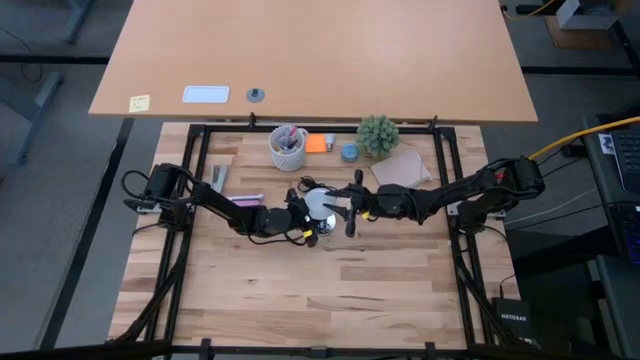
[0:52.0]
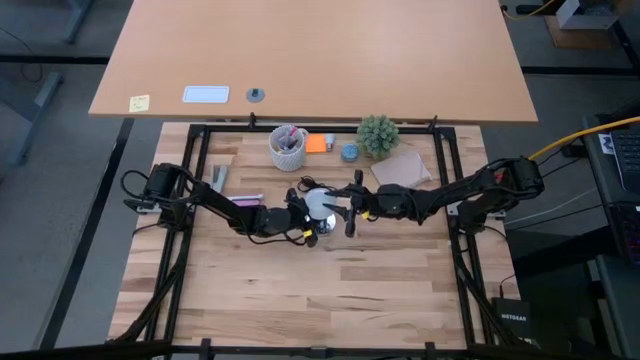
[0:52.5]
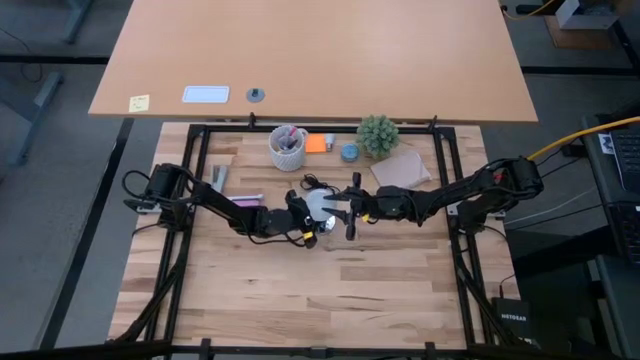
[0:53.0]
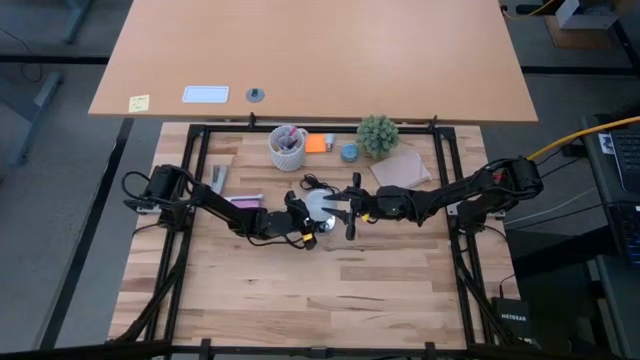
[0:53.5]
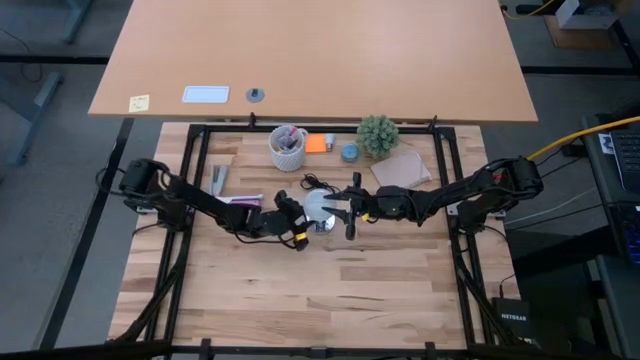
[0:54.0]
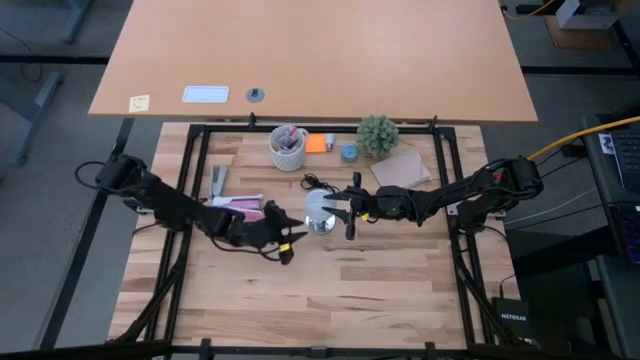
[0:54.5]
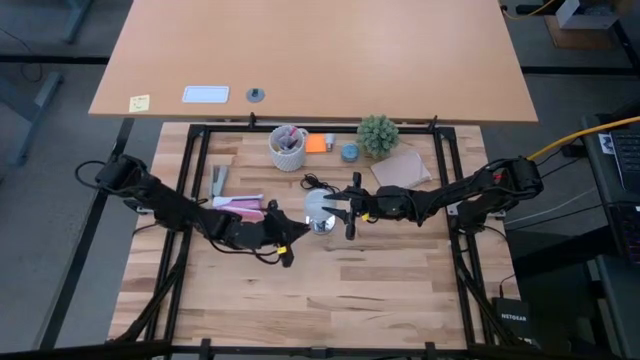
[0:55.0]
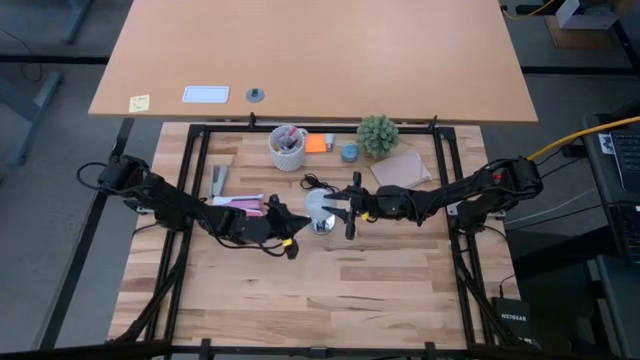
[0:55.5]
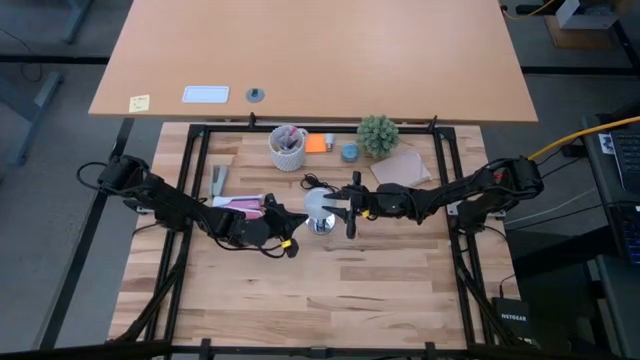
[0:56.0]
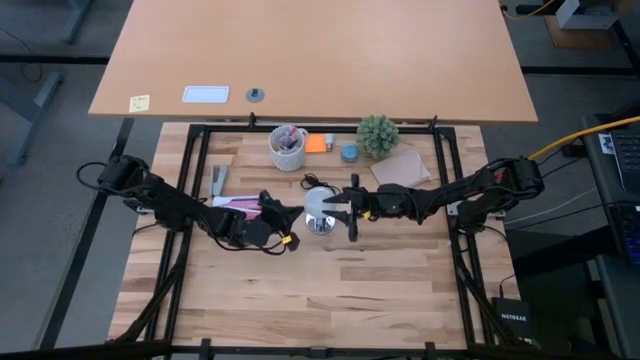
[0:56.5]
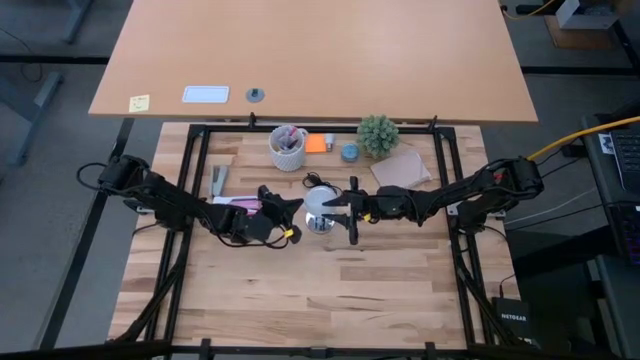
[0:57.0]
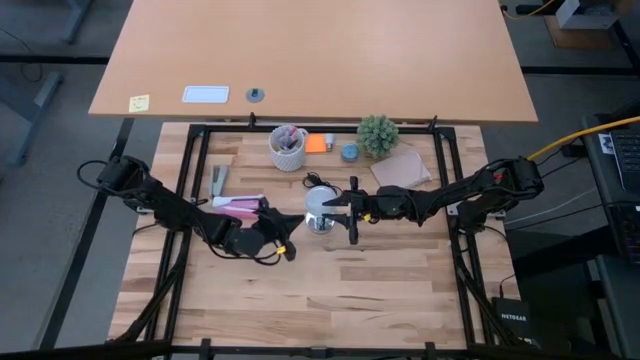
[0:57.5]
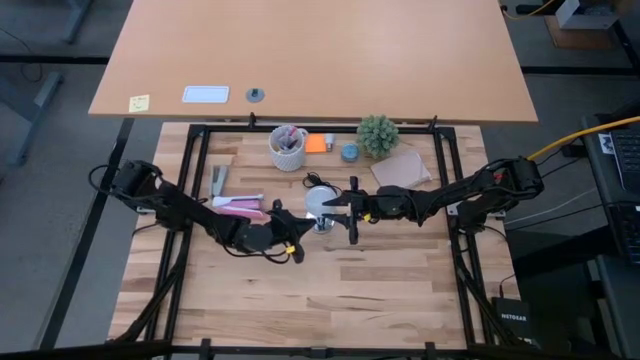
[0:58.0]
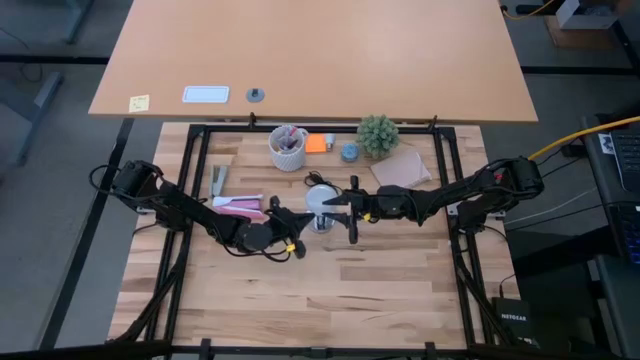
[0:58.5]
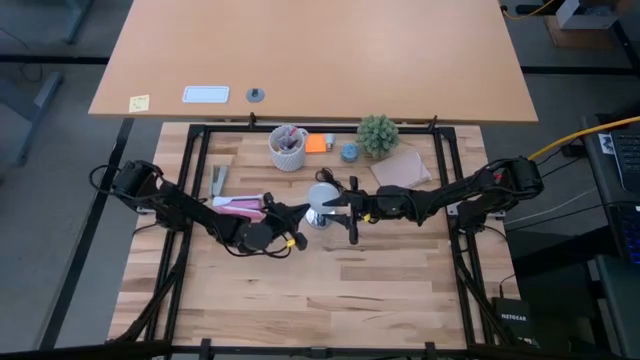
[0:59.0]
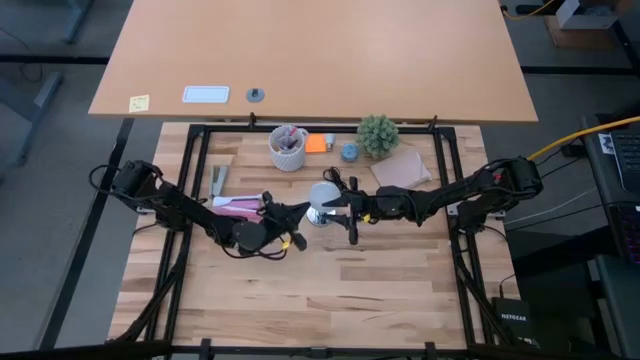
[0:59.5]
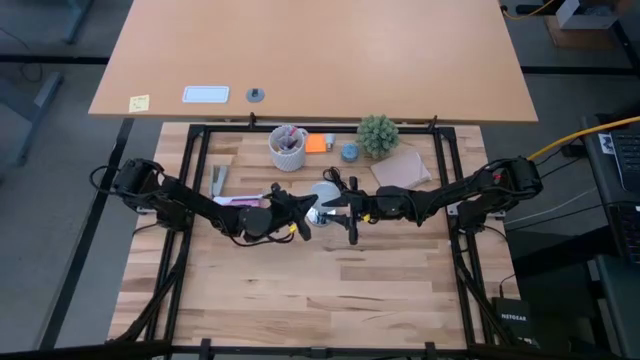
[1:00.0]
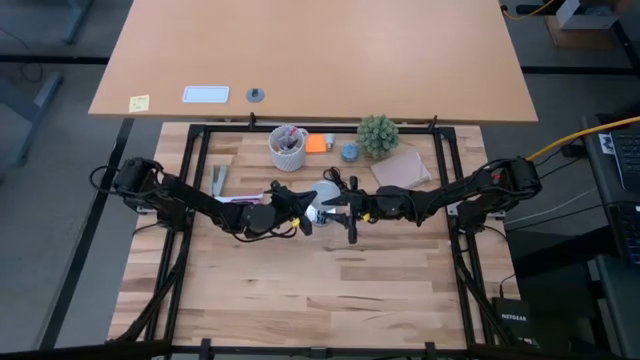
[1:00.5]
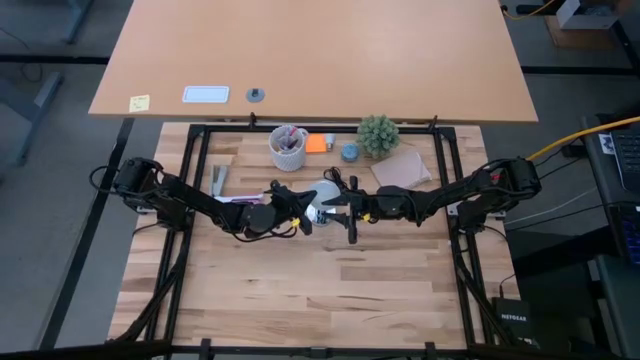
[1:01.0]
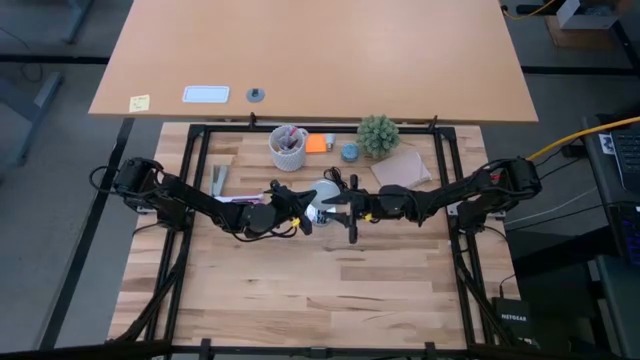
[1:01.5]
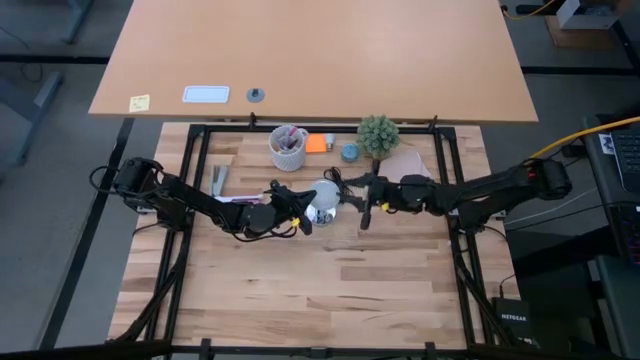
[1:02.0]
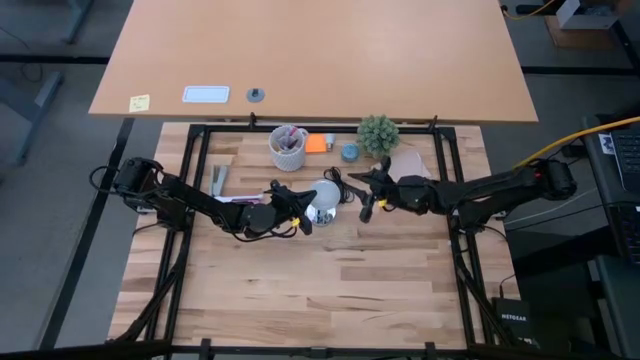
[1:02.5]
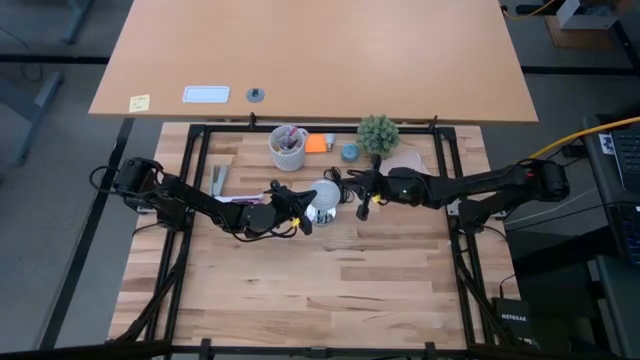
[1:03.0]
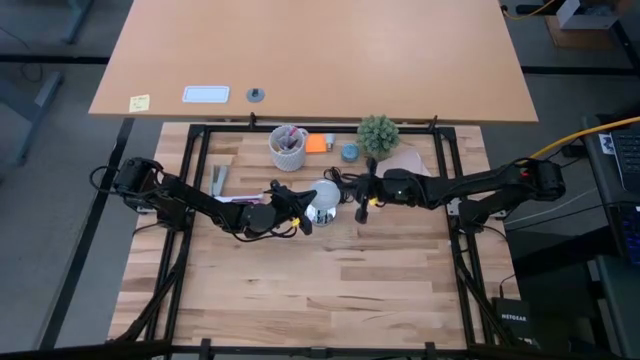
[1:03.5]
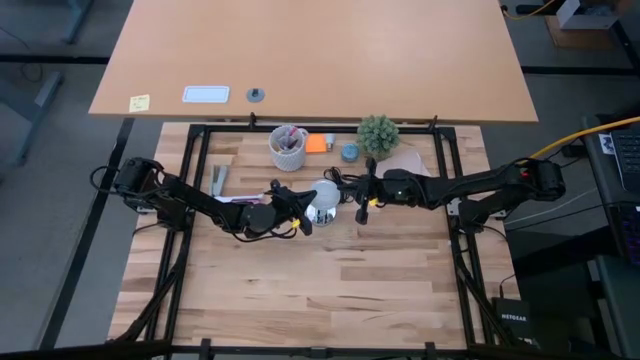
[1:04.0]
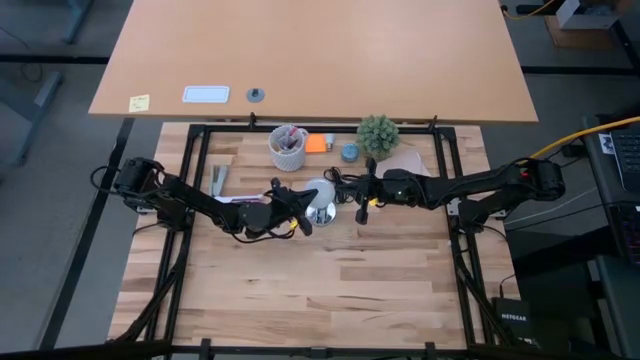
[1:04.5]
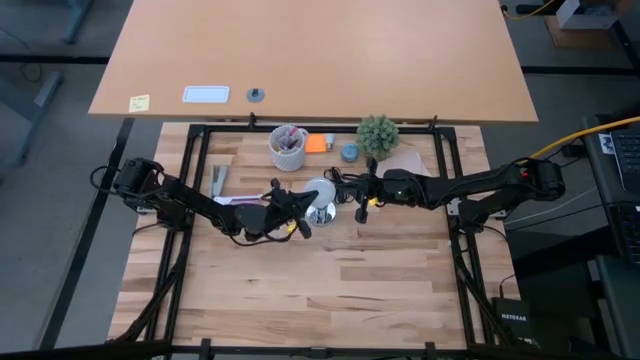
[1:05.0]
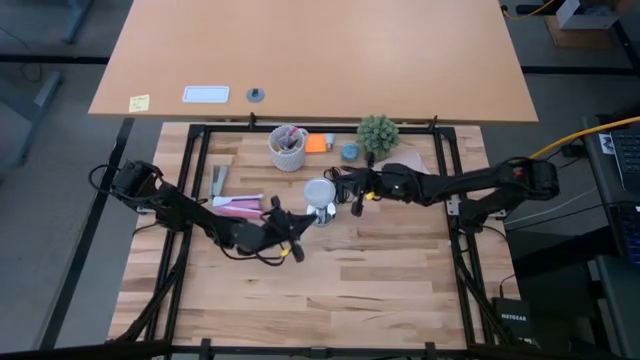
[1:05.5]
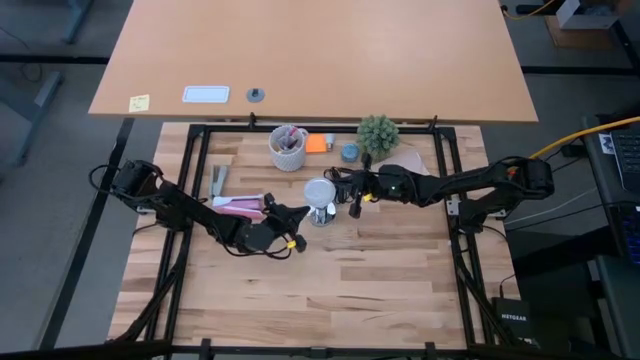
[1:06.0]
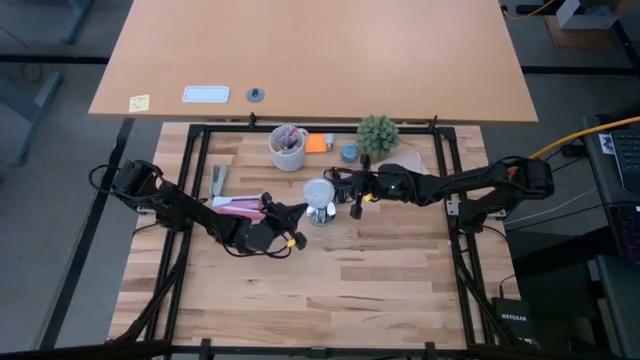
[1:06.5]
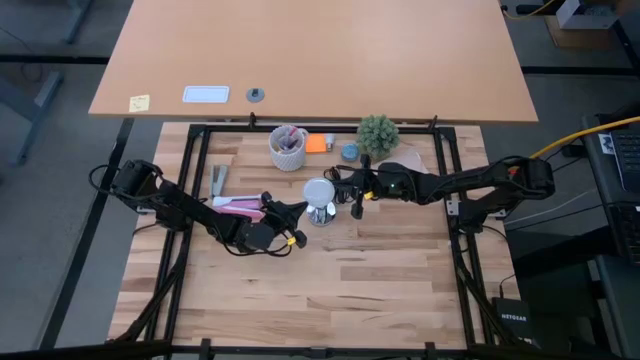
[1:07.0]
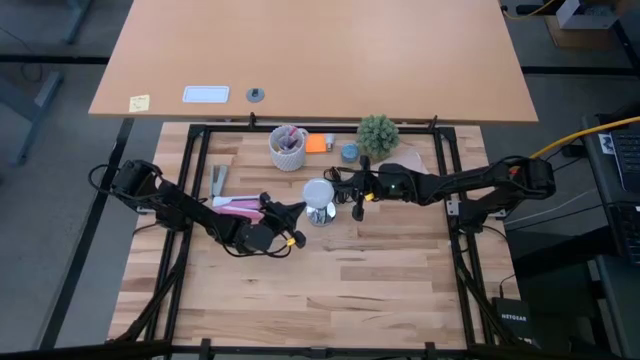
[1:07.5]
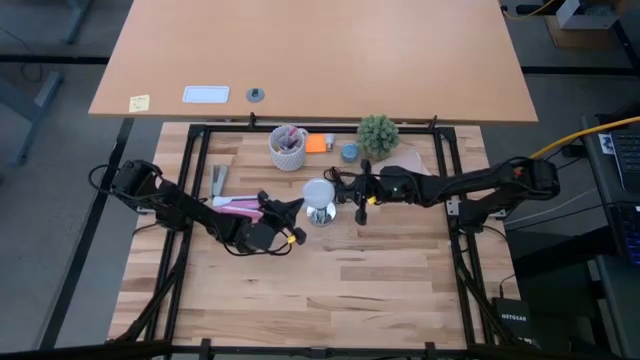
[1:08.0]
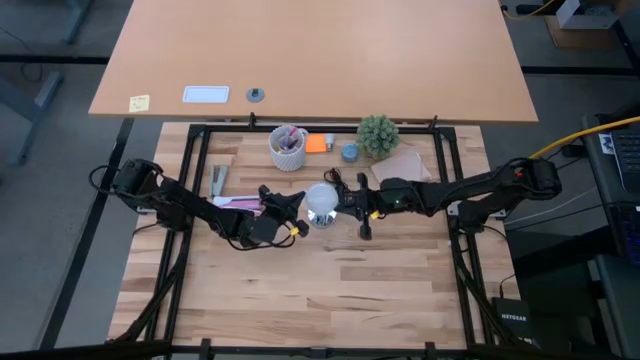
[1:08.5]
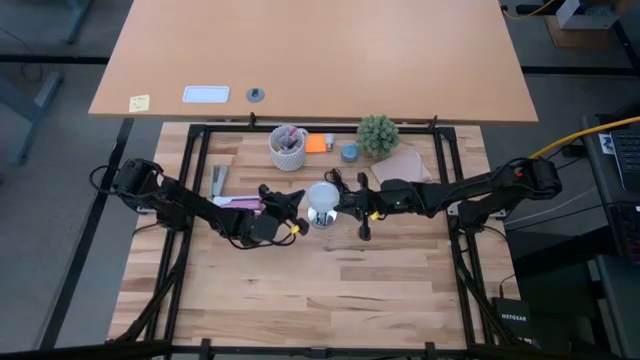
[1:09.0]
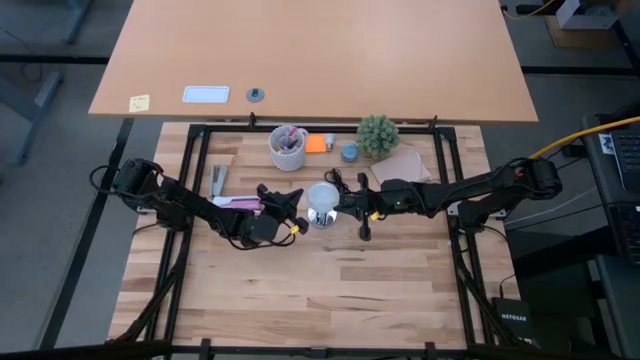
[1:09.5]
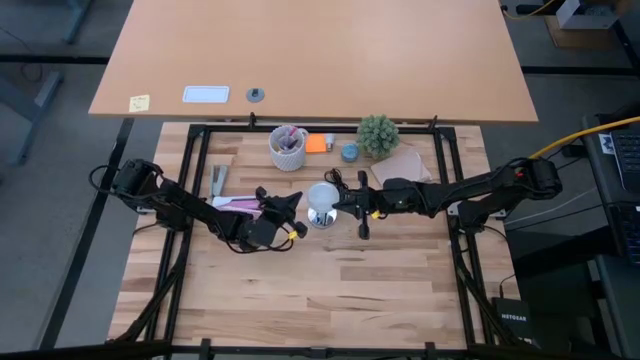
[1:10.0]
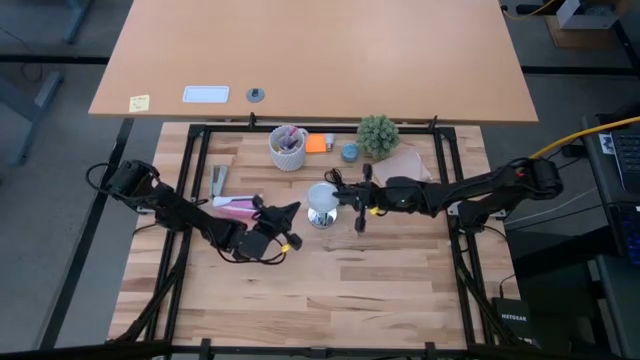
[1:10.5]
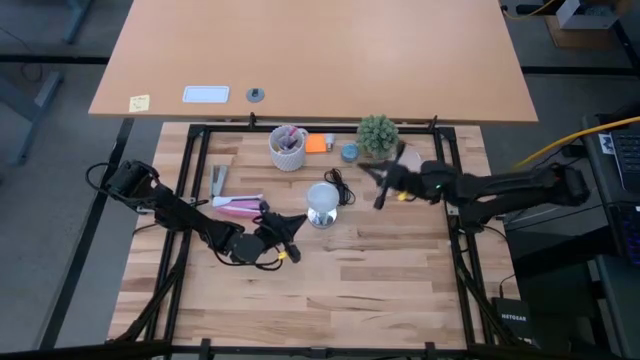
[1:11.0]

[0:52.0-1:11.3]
Task: Screw lightbulb
Insert the white light bulb into the silver lamp
